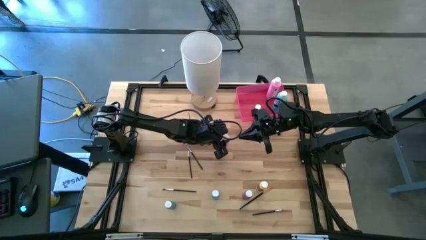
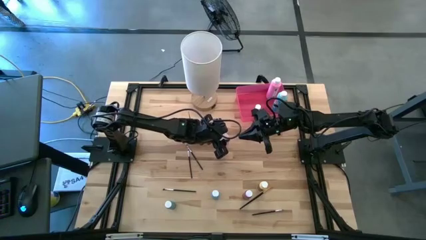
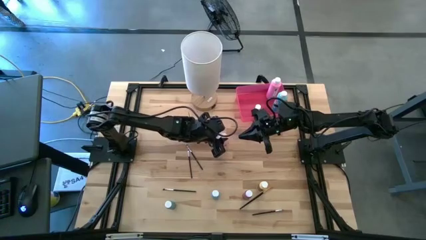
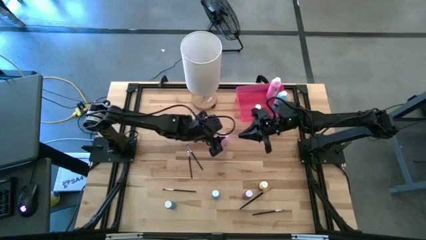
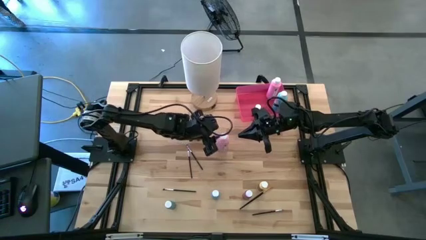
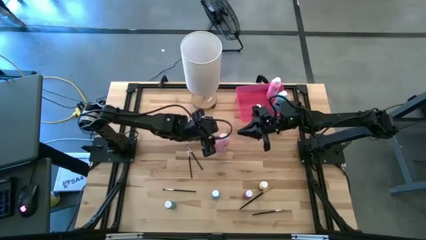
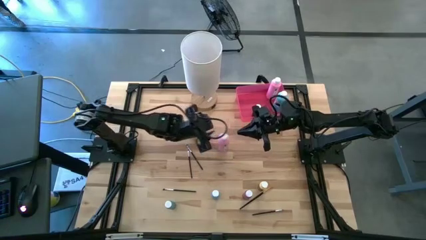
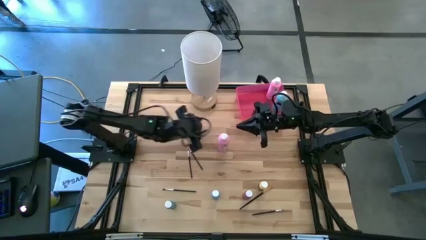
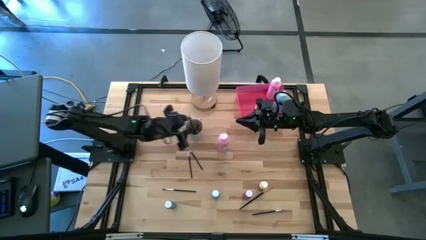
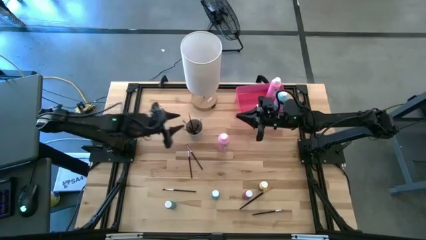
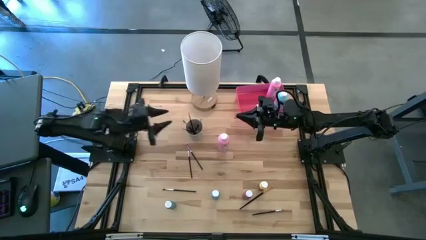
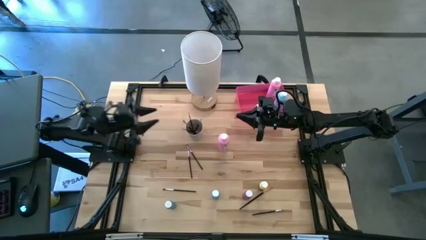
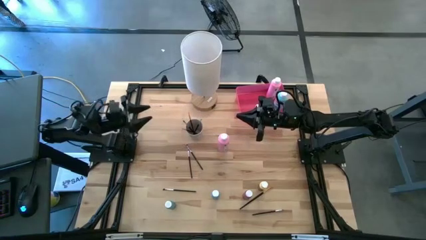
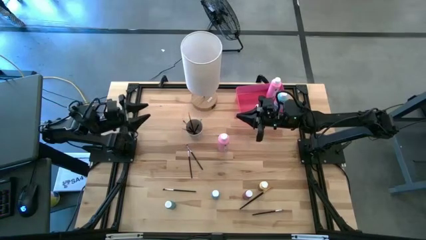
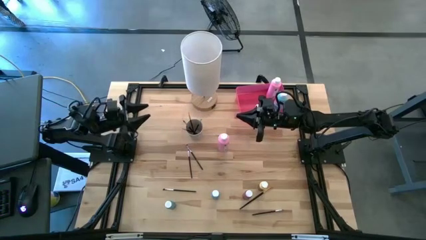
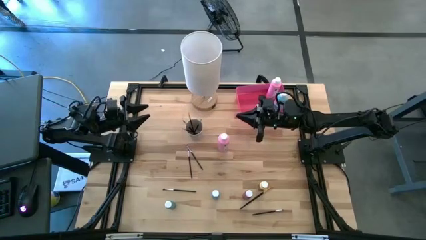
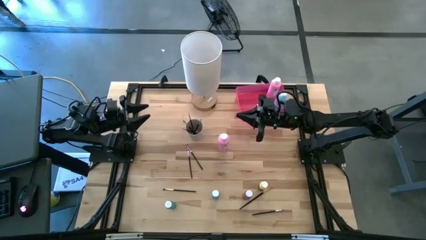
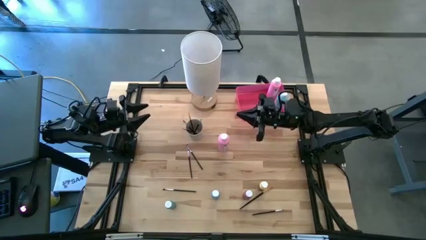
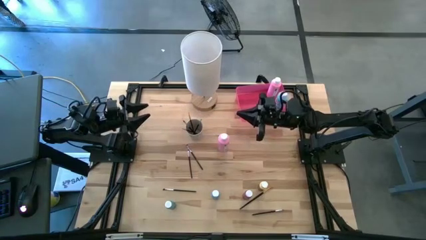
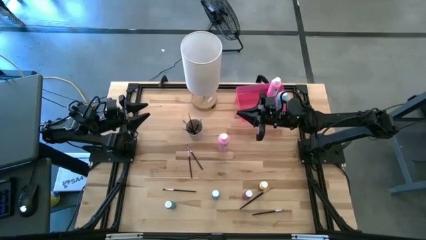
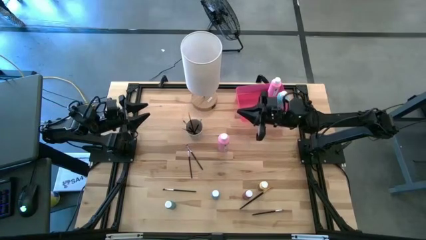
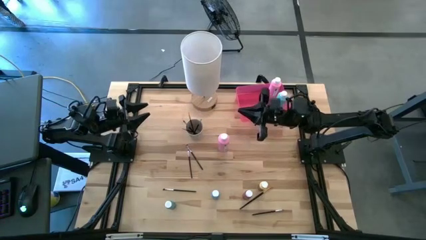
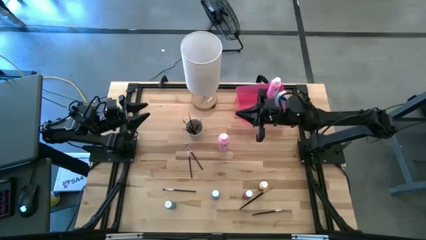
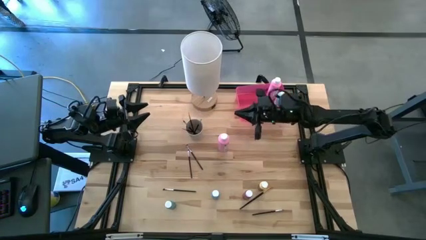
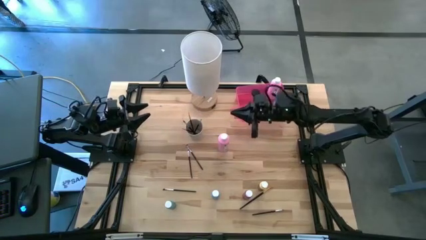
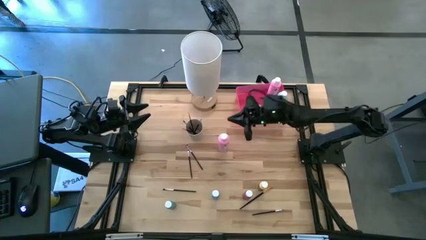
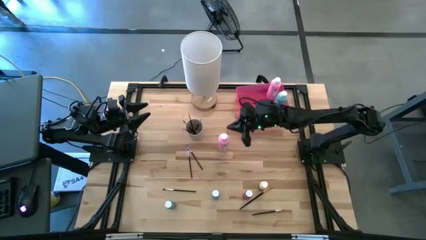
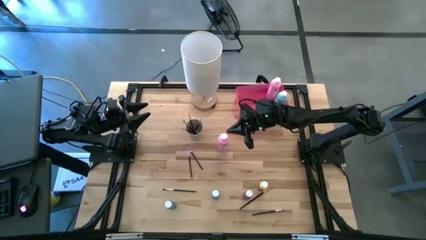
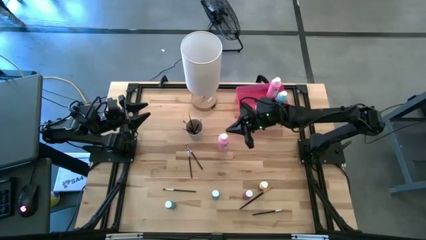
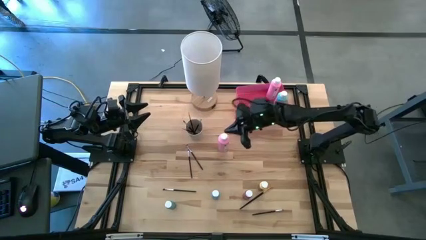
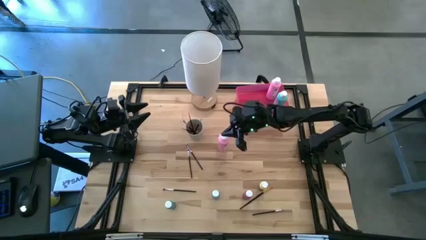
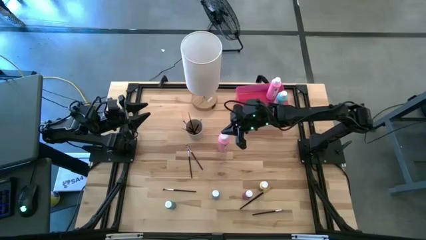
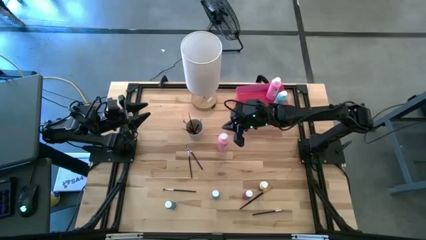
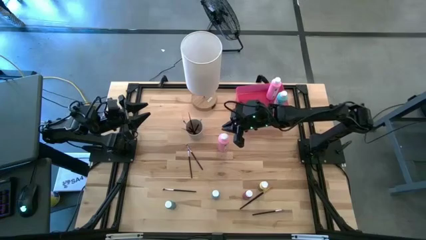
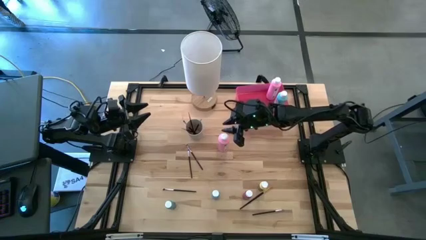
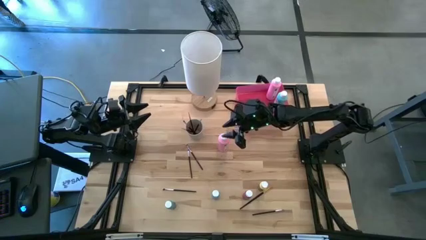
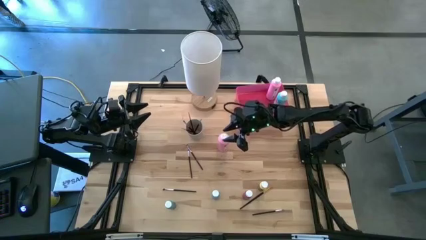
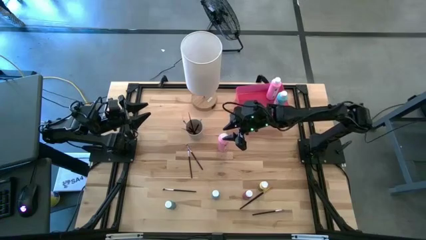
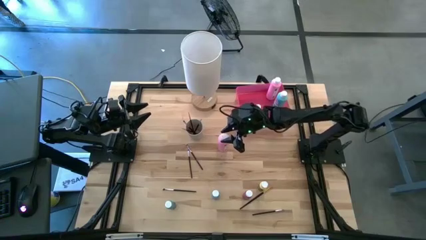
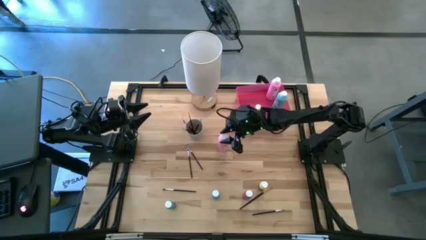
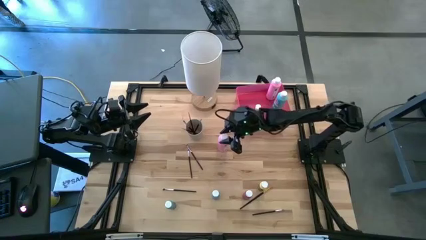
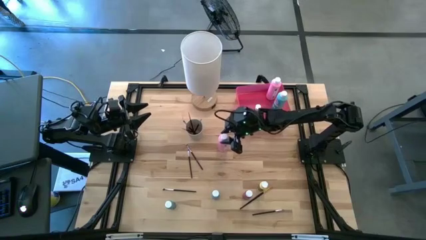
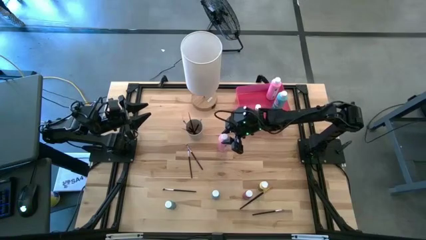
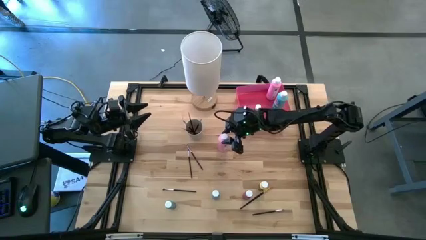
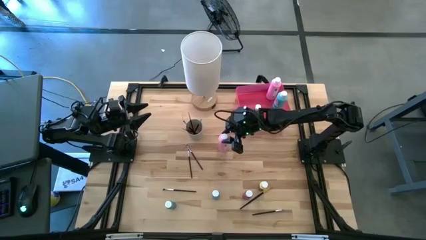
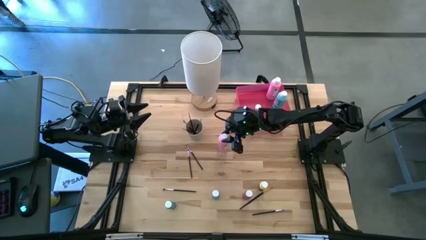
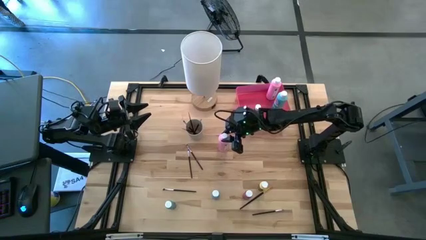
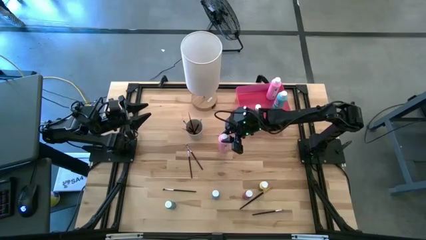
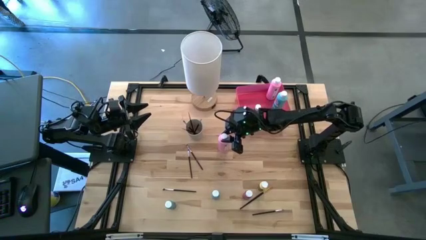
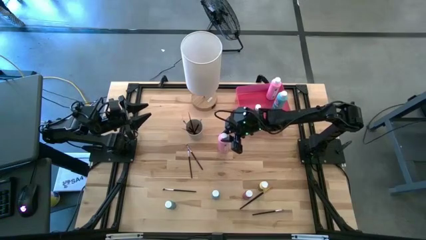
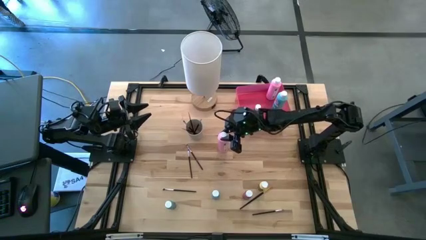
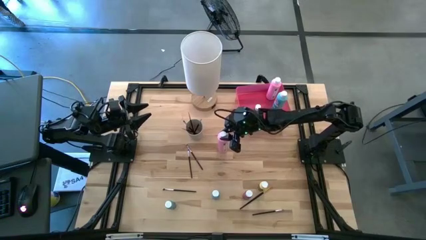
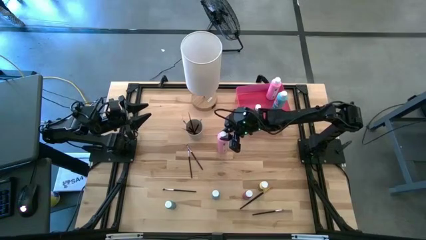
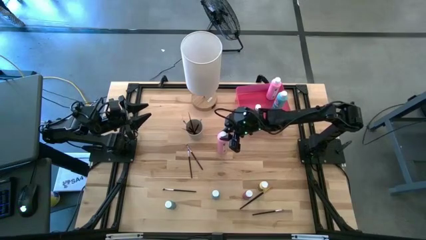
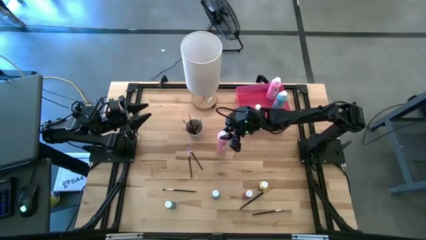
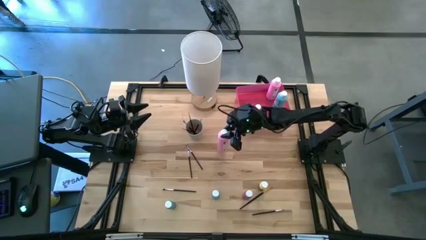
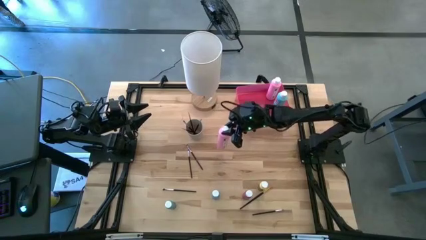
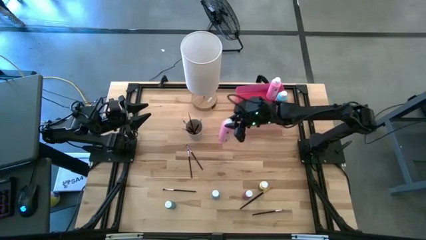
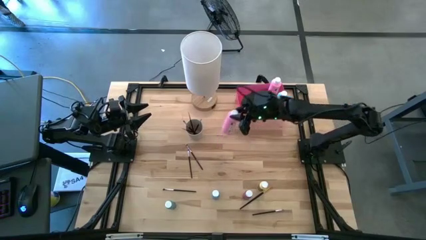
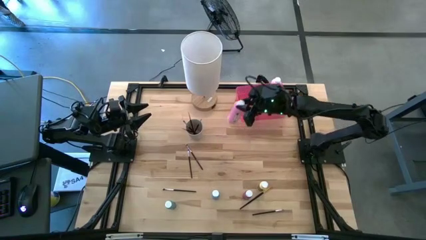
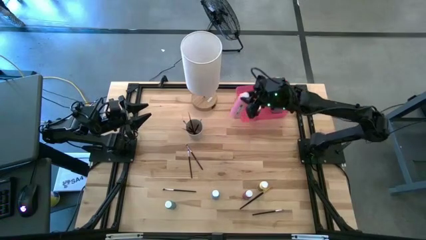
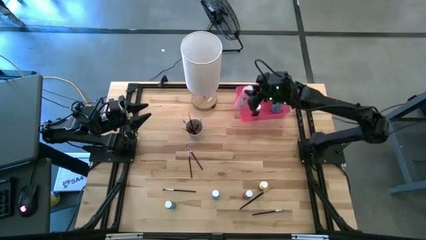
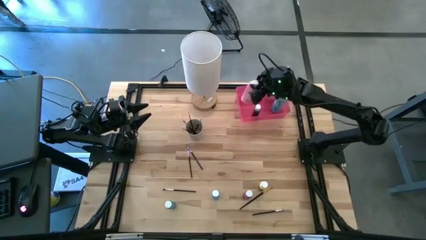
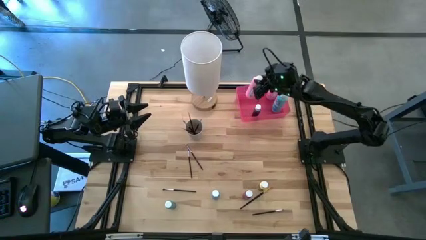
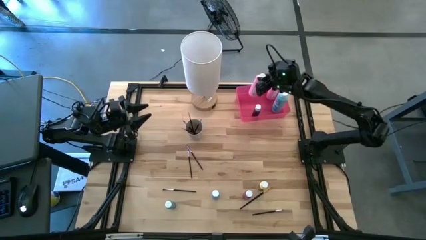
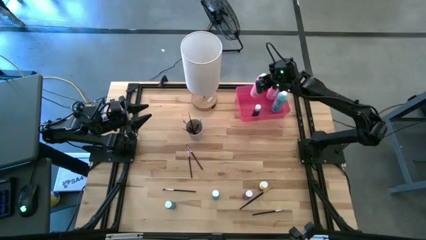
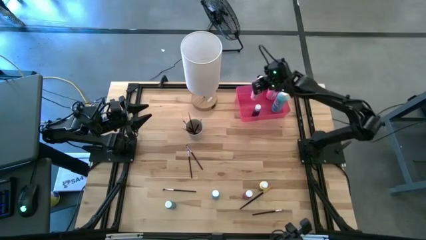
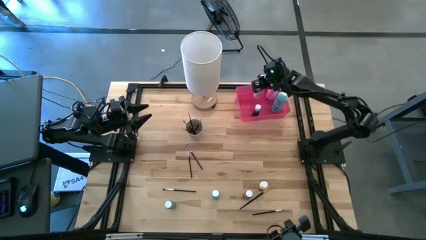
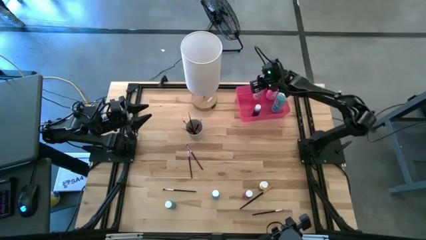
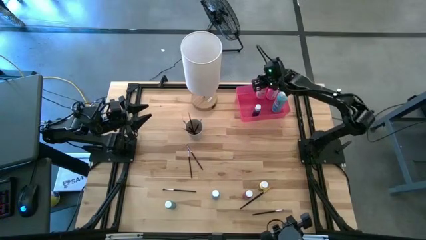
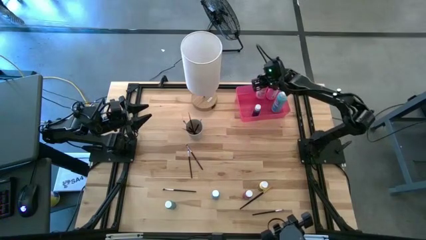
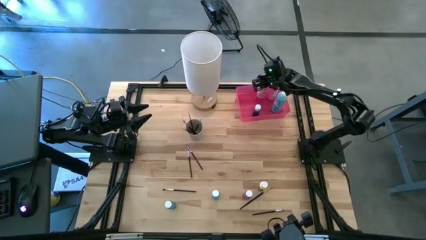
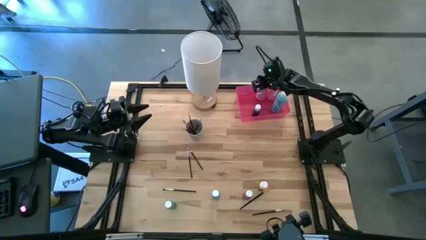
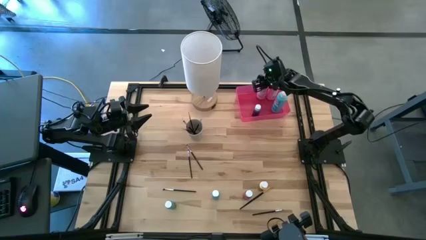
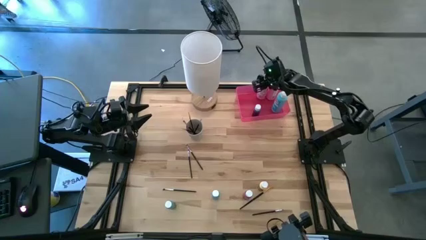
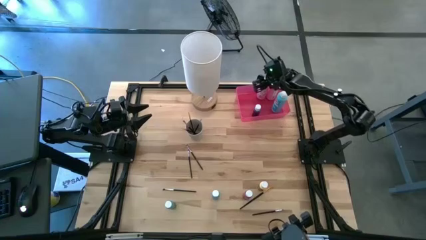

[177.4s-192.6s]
Task: Pick & Place Paint Supplies
Put the big pink paint bottle into the pink bin
